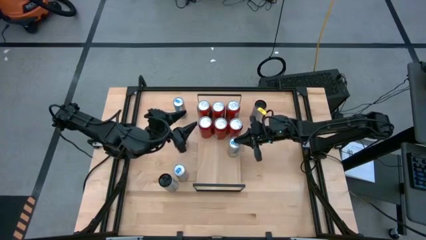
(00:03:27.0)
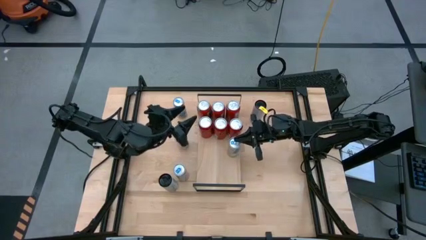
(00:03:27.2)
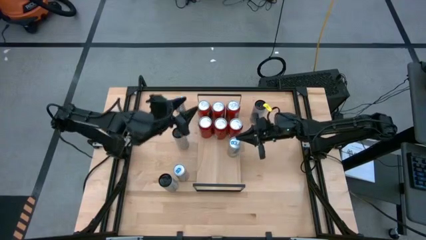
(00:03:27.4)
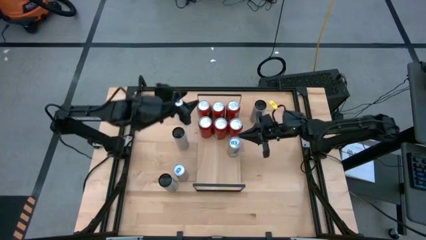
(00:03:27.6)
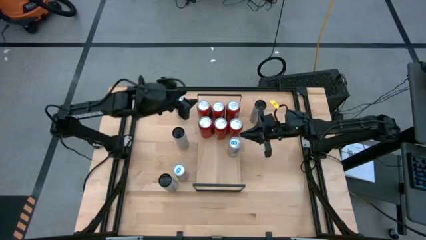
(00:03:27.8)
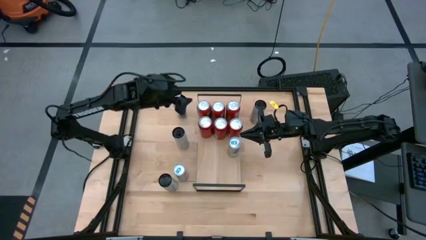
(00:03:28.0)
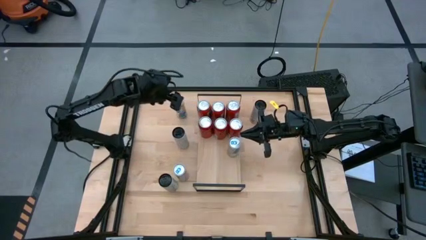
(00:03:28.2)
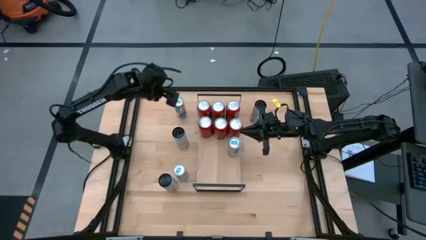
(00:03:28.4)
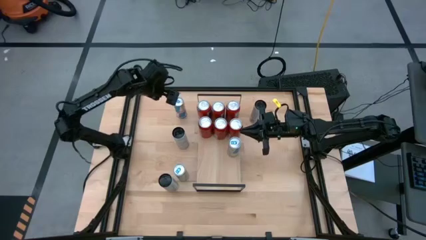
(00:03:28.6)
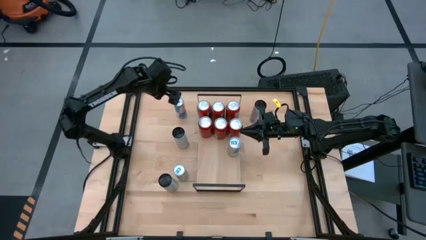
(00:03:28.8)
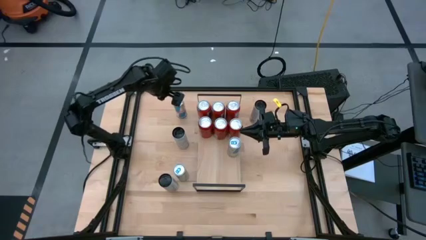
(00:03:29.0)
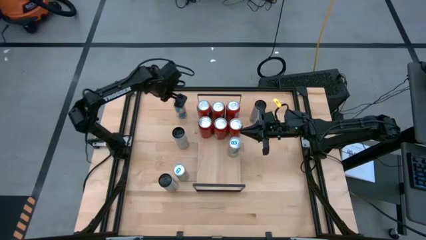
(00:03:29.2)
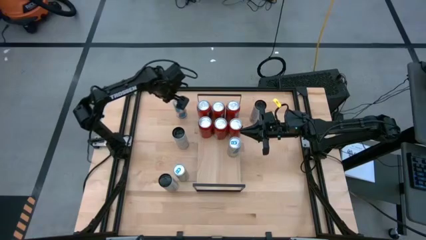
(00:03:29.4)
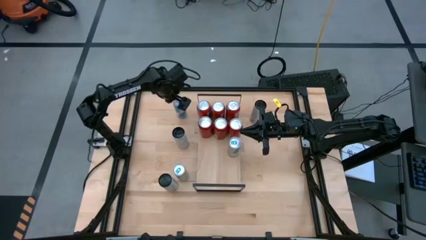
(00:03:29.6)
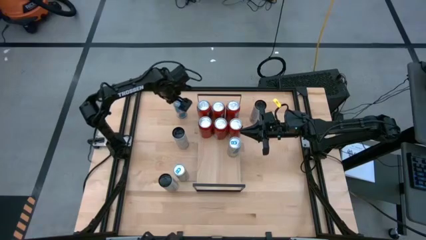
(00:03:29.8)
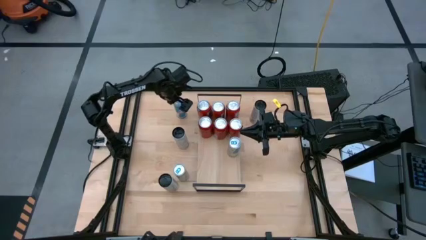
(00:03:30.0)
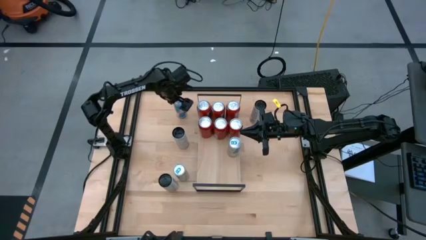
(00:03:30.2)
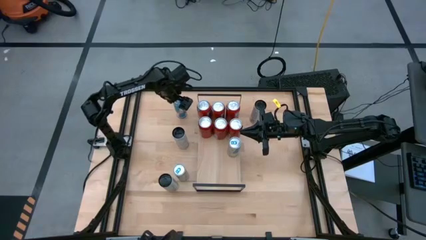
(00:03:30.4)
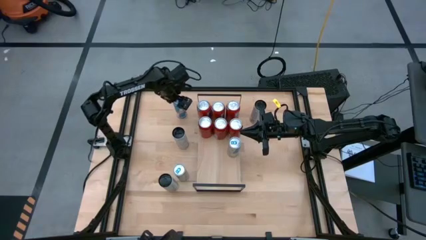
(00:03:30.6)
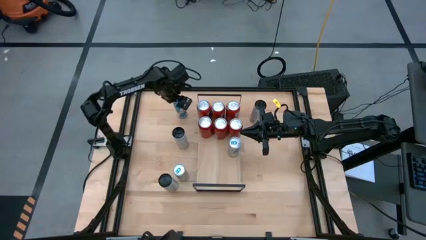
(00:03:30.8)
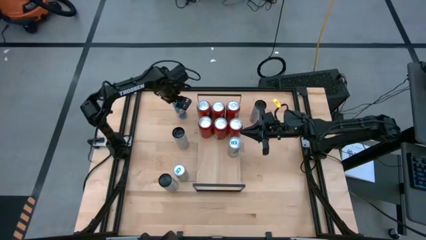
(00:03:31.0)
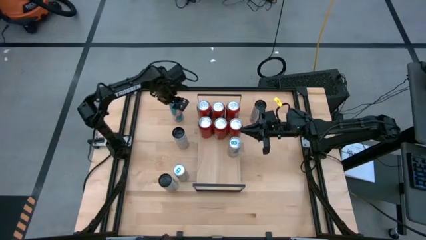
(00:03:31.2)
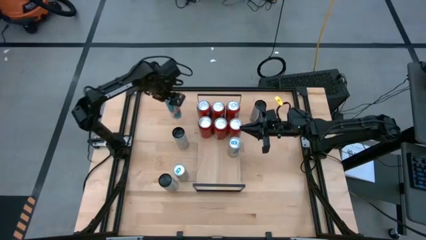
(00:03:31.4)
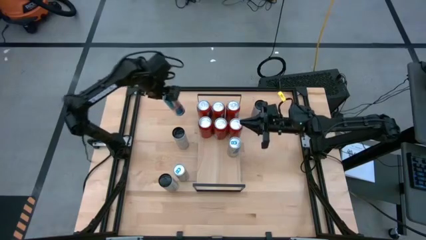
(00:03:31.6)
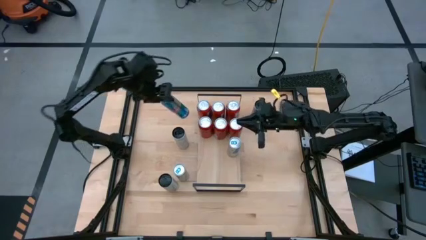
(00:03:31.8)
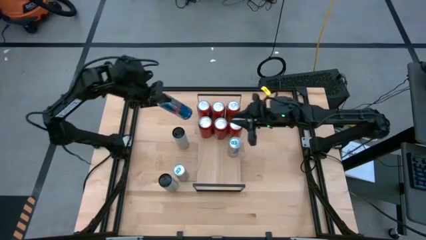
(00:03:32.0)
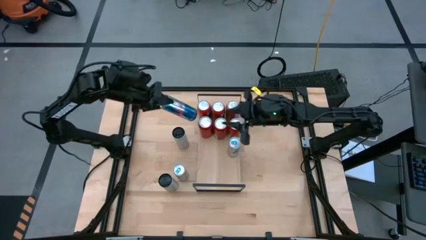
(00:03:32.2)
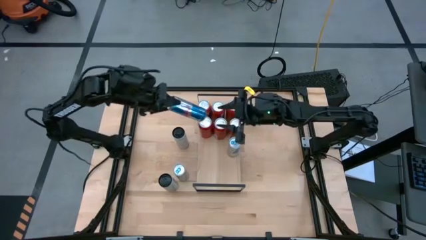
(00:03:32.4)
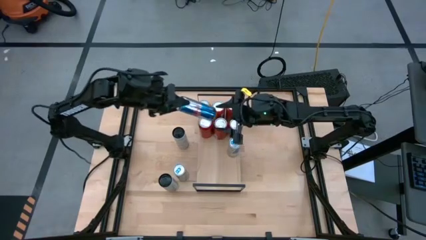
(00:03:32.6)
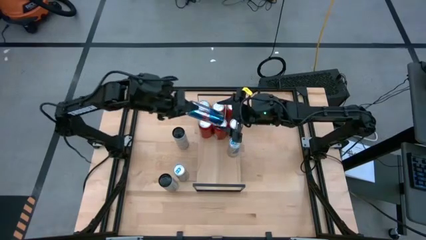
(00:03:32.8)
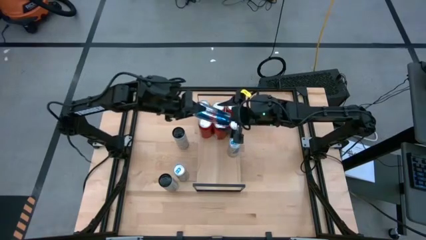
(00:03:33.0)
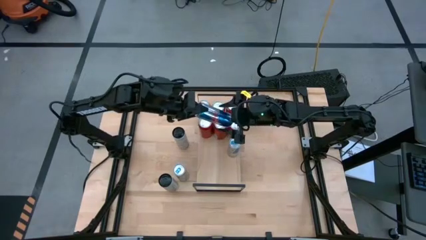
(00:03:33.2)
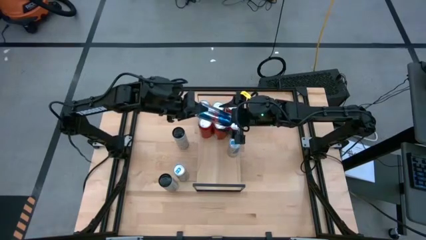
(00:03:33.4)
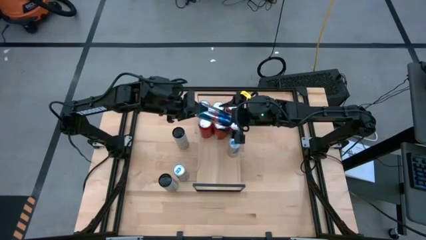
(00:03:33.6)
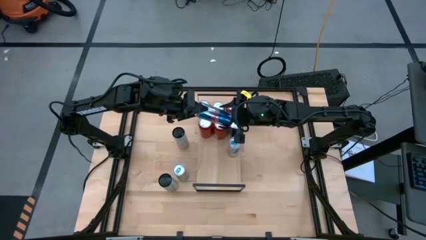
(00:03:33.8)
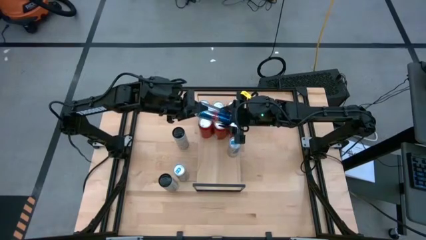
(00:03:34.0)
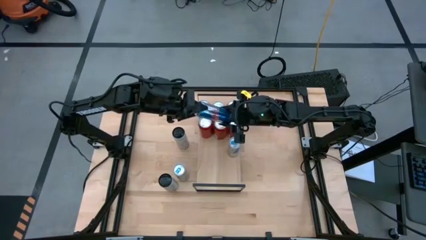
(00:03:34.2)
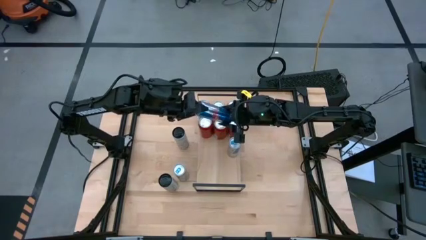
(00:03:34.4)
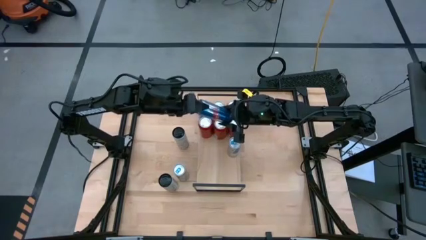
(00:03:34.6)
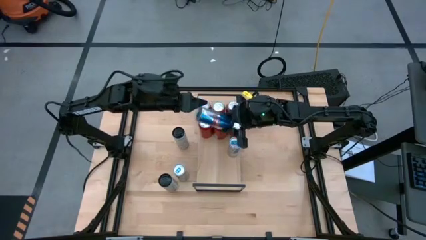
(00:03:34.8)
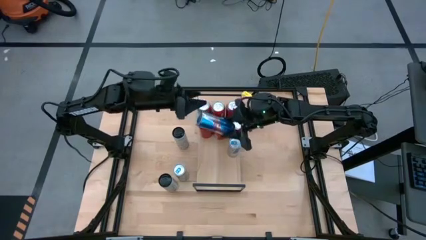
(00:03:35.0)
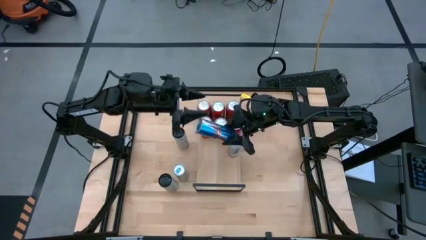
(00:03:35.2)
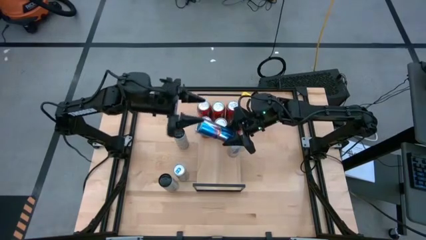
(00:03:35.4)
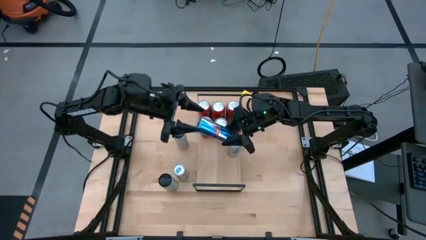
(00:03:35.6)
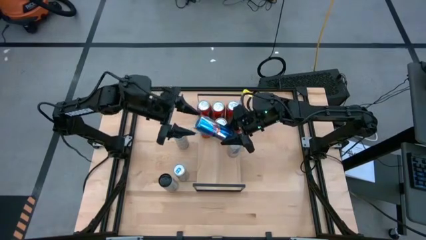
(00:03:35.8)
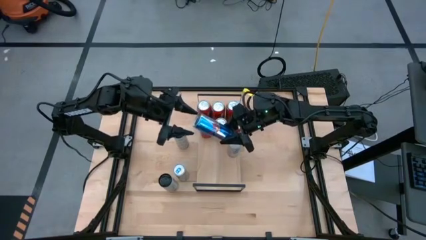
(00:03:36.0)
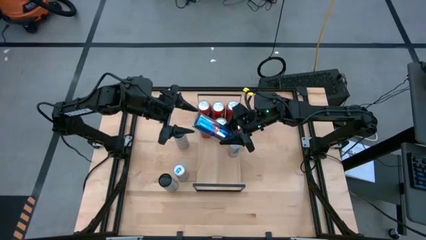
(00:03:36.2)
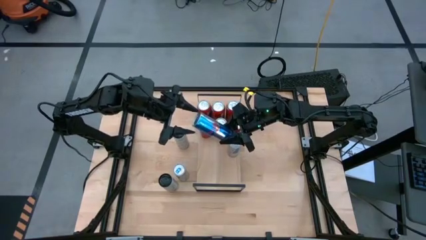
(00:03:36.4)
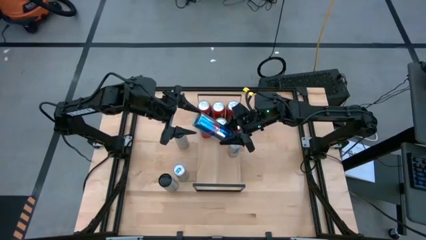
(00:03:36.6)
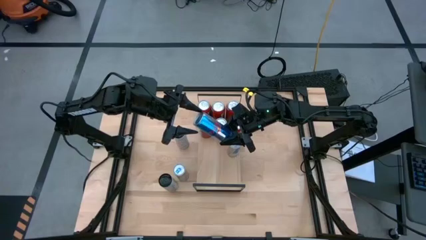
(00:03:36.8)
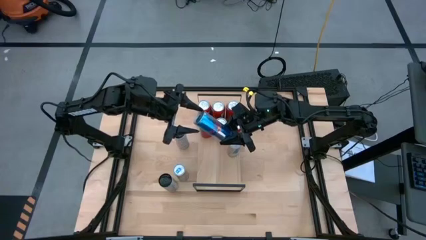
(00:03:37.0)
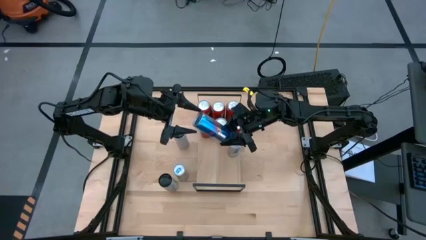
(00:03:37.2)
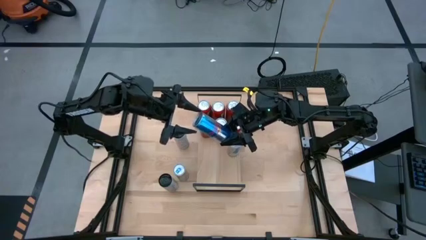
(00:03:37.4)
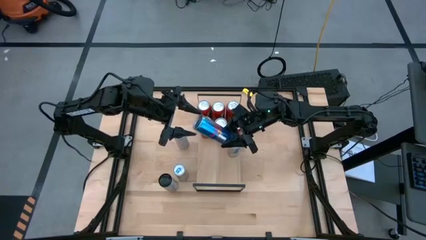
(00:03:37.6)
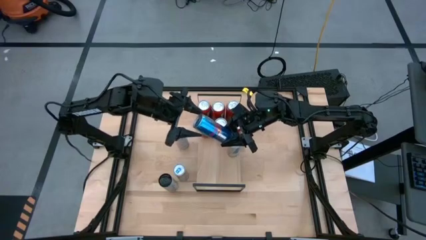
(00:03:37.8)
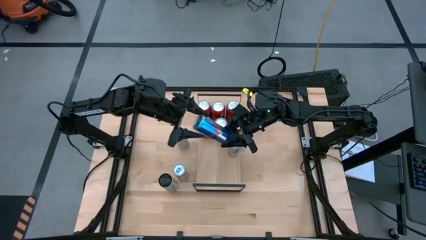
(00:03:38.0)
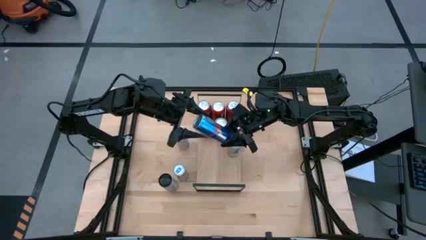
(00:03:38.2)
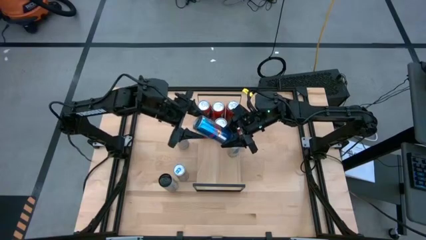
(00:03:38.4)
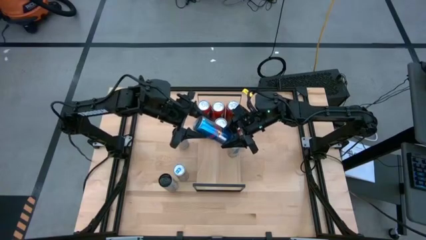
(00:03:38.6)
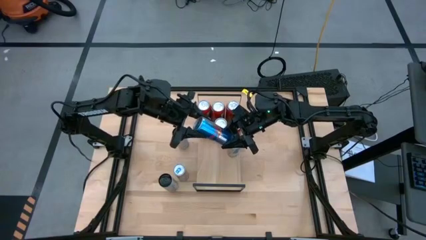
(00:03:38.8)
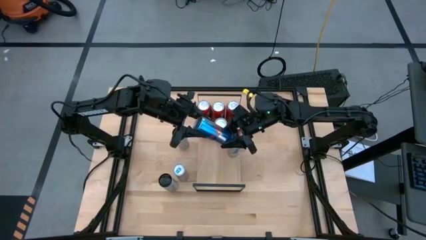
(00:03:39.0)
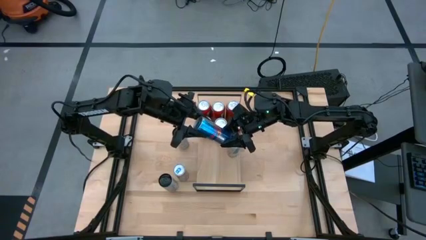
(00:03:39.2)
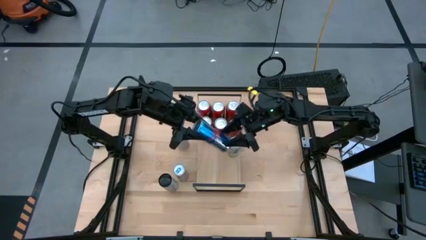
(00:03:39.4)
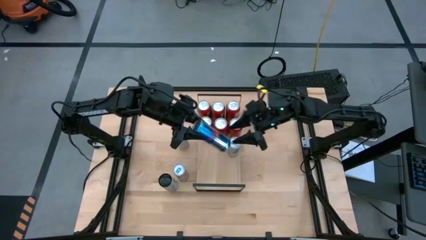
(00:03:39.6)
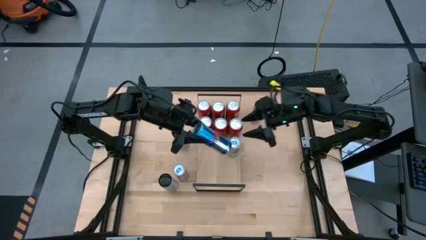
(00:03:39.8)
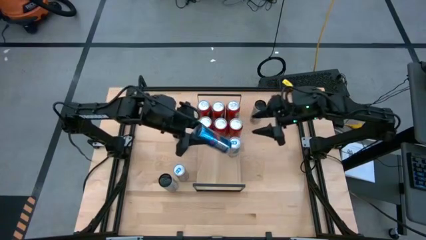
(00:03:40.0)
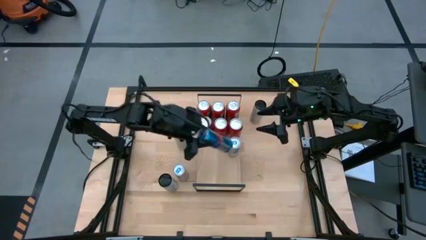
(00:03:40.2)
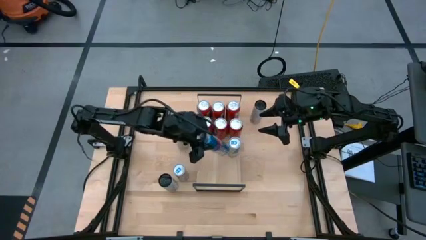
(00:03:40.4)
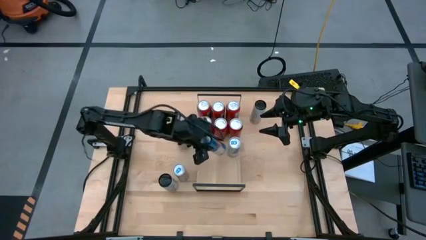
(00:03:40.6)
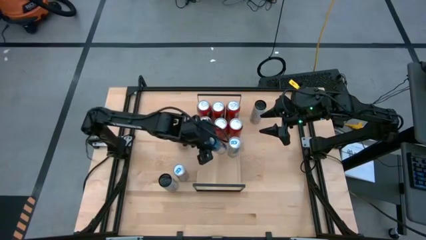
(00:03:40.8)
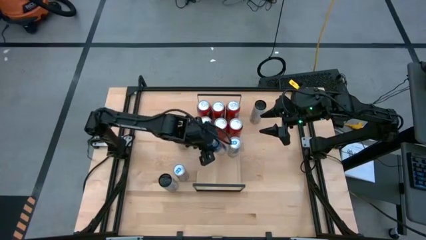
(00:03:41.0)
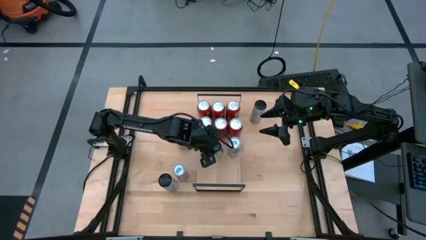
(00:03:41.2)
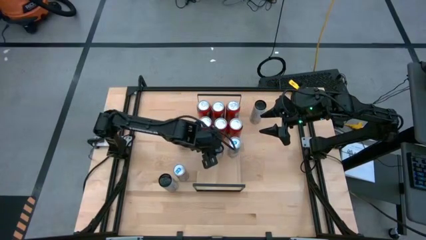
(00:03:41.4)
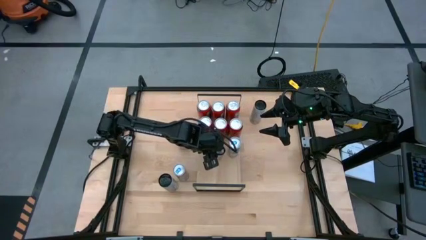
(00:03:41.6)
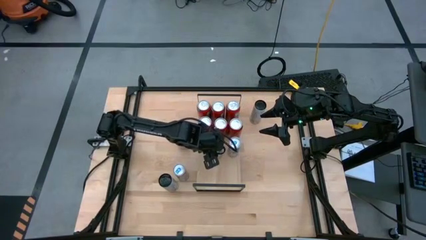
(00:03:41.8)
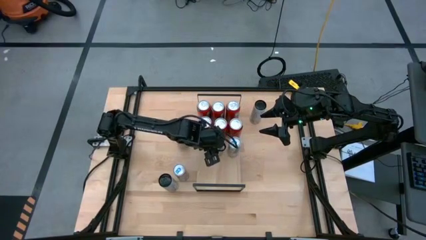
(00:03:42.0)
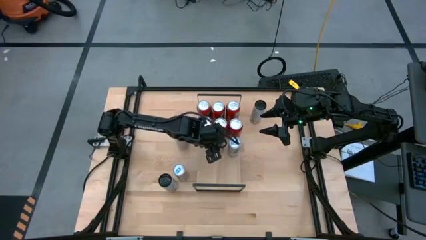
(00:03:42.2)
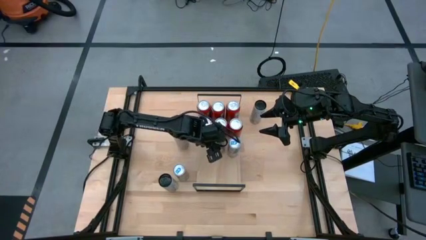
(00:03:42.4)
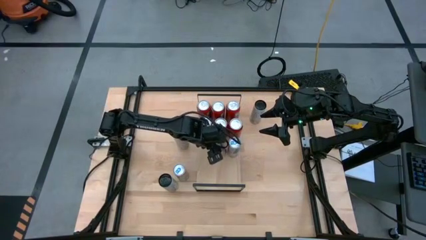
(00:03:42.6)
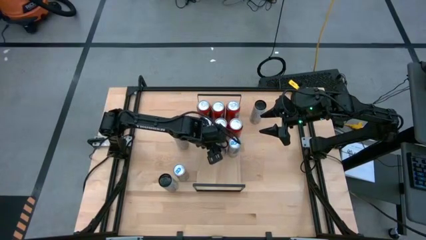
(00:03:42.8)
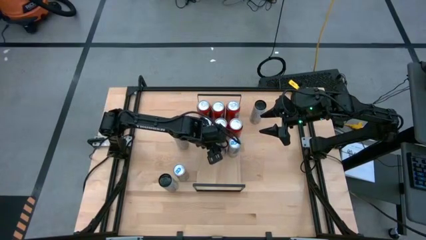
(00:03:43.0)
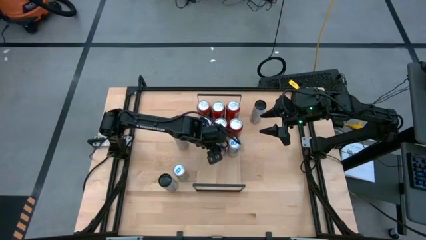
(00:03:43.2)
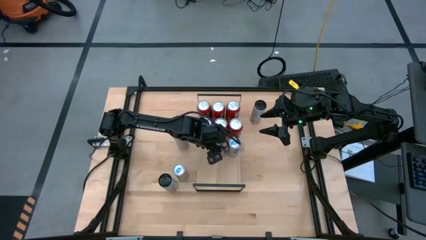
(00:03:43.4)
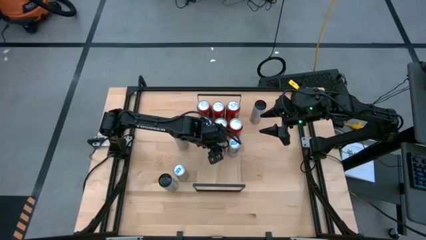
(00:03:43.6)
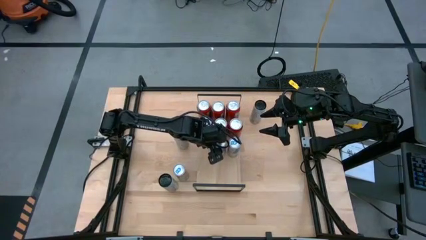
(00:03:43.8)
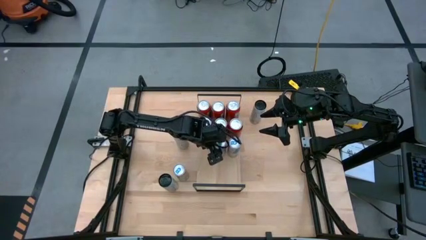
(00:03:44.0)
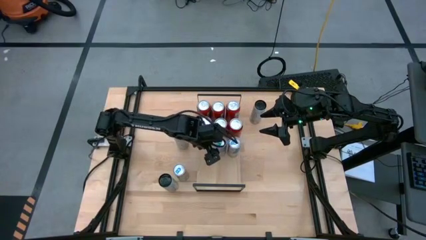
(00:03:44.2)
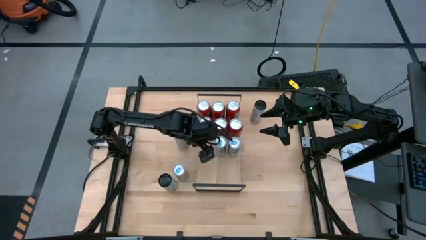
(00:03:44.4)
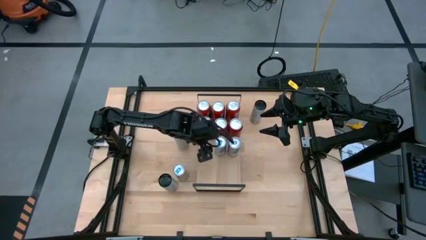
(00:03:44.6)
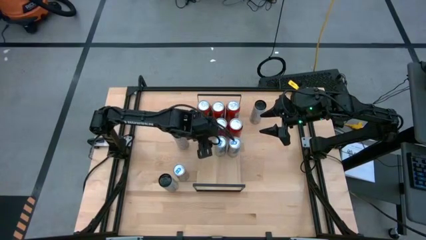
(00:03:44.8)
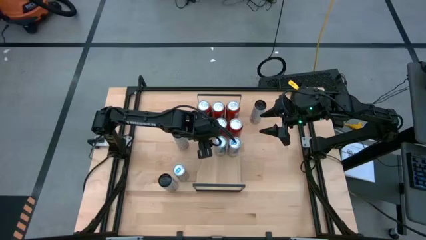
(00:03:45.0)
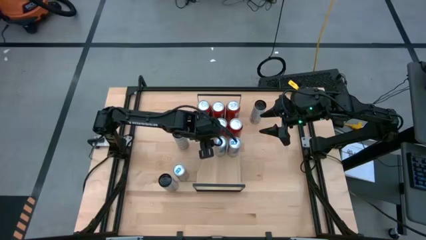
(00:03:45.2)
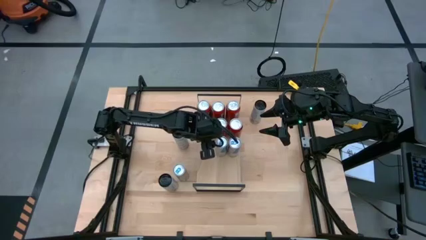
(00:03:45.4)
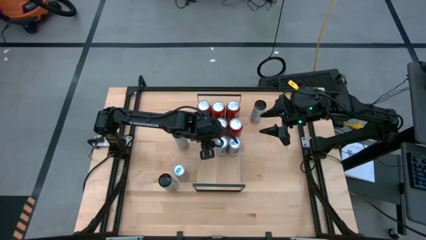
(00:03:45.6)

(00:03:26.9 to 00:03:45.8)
Task: Place canned beverage on shelf
Put the top blue soda can on the shelf aligned with the other blue soda can
